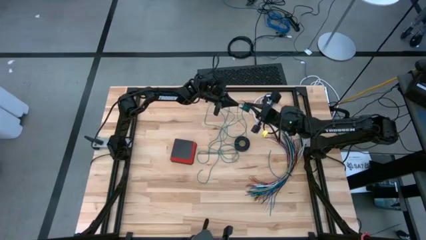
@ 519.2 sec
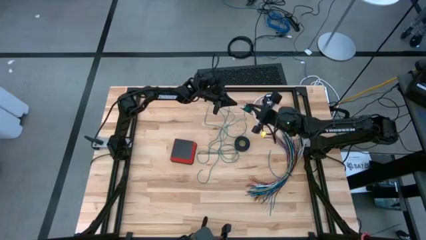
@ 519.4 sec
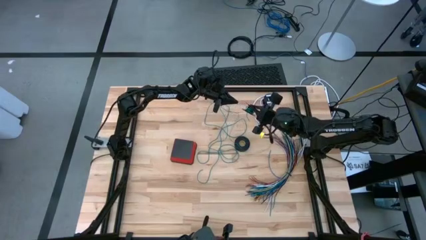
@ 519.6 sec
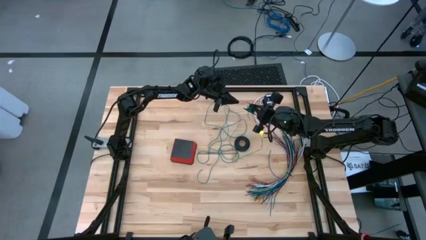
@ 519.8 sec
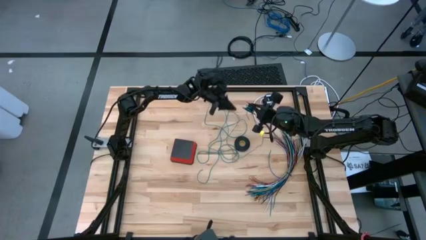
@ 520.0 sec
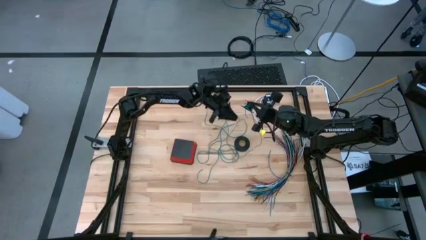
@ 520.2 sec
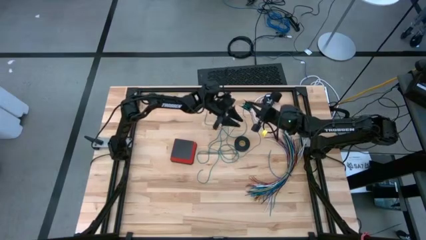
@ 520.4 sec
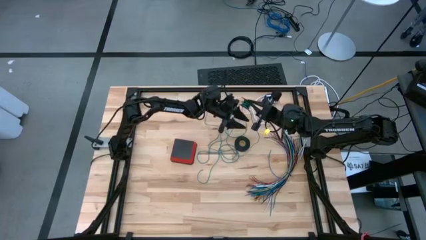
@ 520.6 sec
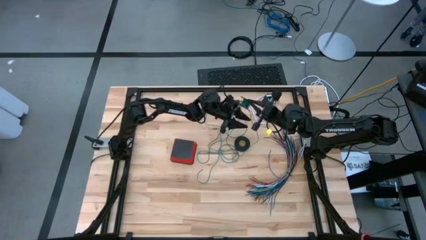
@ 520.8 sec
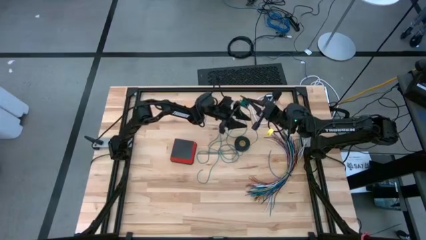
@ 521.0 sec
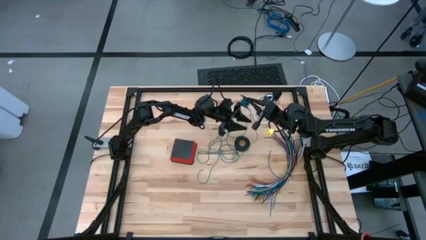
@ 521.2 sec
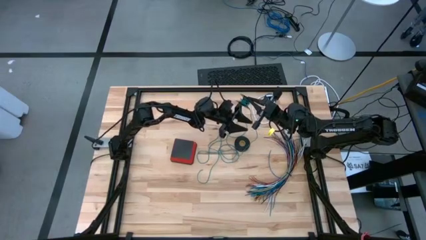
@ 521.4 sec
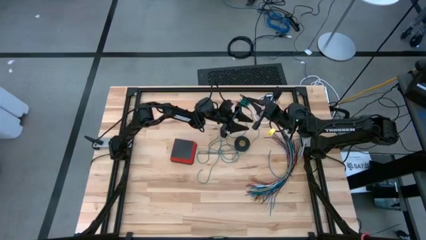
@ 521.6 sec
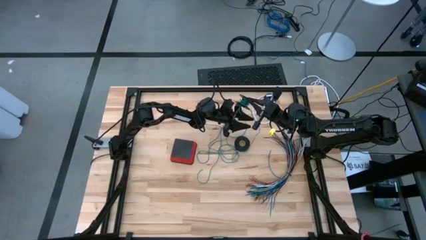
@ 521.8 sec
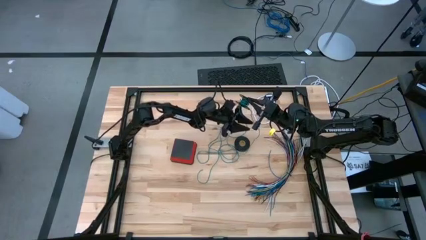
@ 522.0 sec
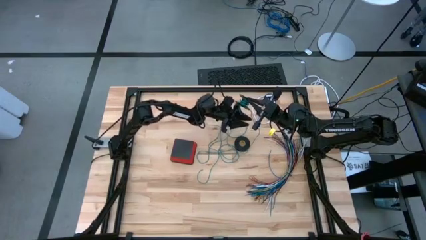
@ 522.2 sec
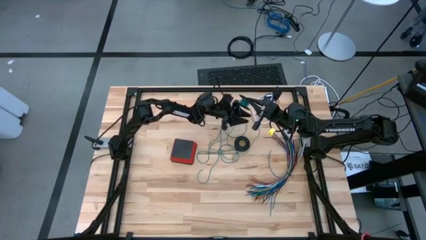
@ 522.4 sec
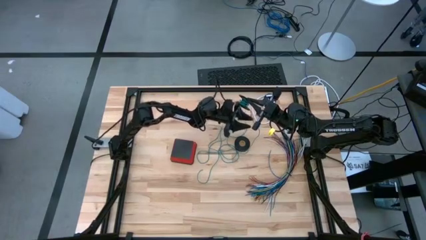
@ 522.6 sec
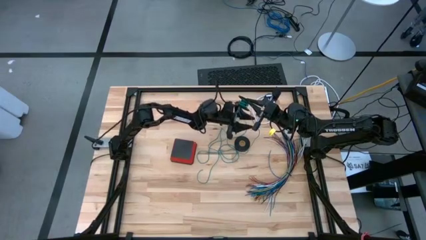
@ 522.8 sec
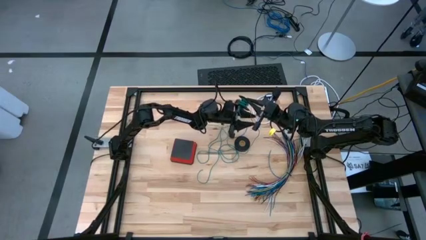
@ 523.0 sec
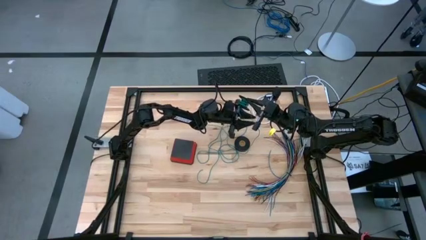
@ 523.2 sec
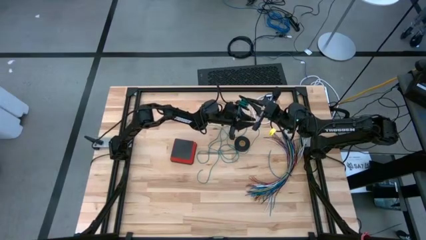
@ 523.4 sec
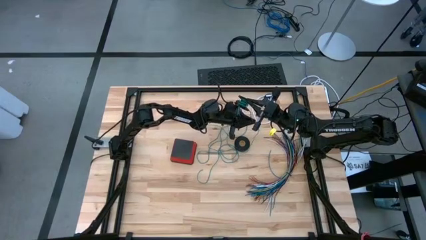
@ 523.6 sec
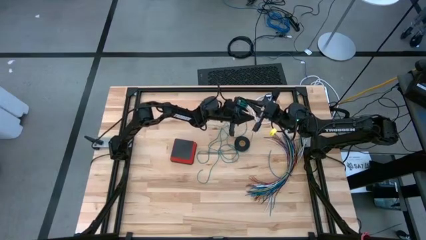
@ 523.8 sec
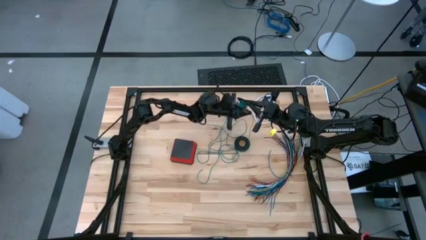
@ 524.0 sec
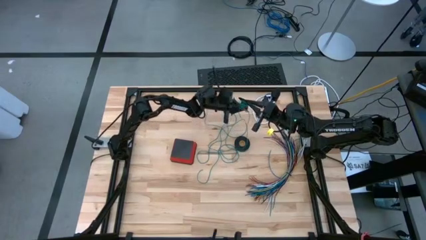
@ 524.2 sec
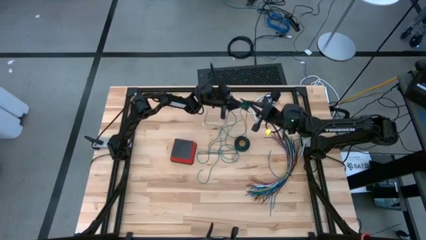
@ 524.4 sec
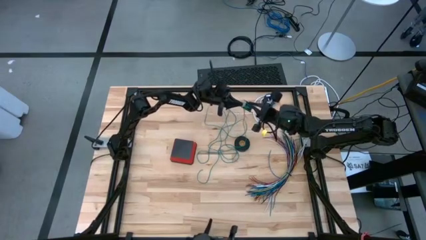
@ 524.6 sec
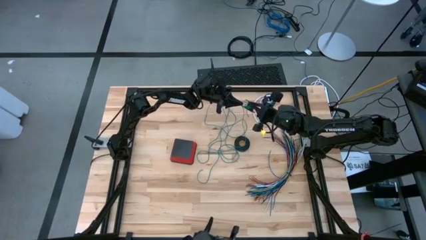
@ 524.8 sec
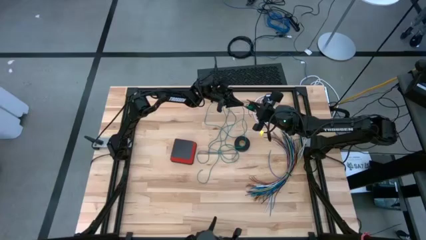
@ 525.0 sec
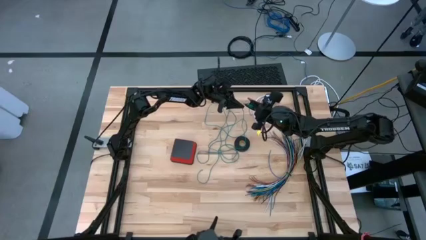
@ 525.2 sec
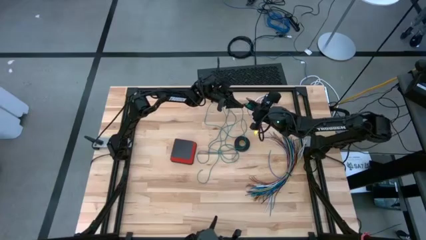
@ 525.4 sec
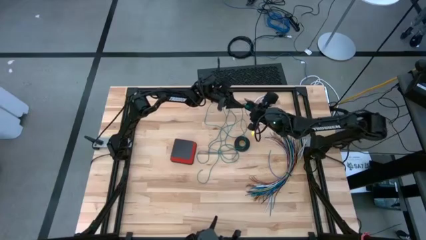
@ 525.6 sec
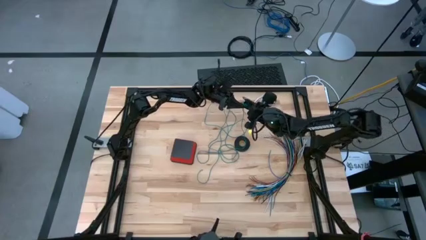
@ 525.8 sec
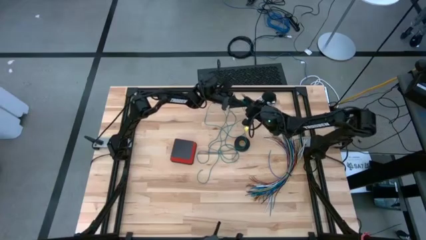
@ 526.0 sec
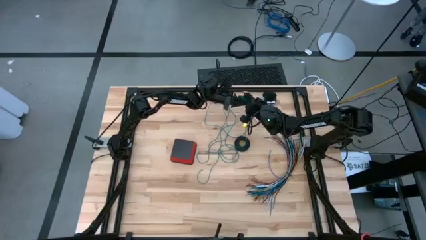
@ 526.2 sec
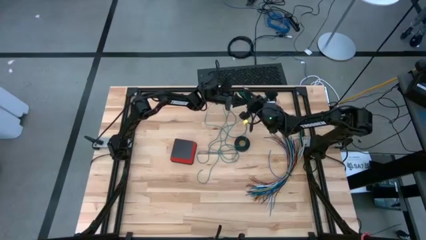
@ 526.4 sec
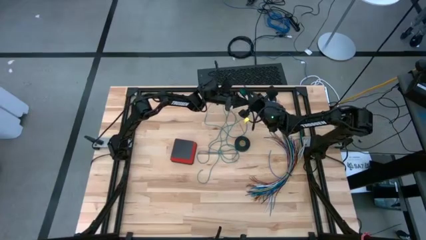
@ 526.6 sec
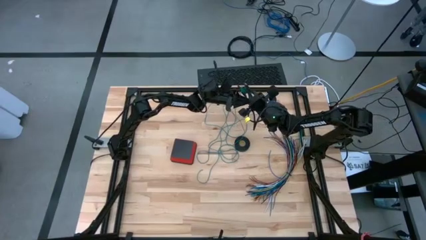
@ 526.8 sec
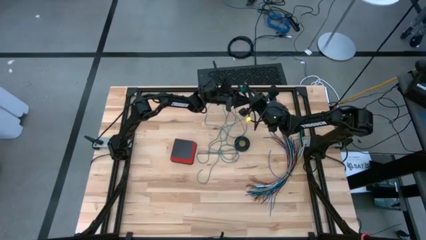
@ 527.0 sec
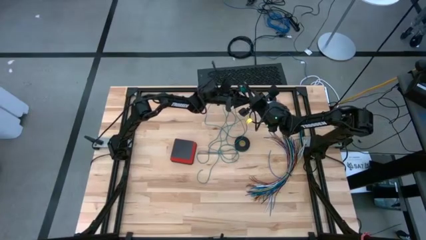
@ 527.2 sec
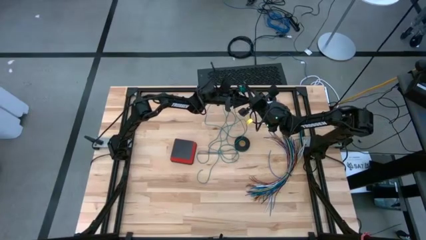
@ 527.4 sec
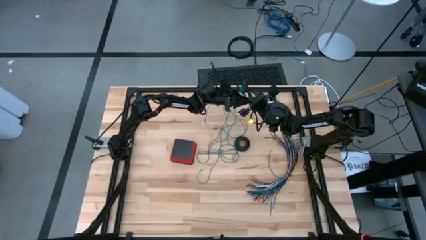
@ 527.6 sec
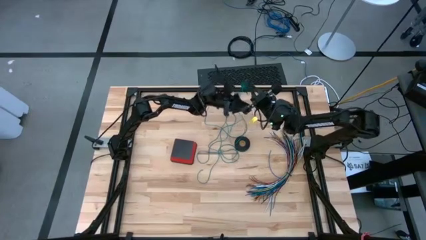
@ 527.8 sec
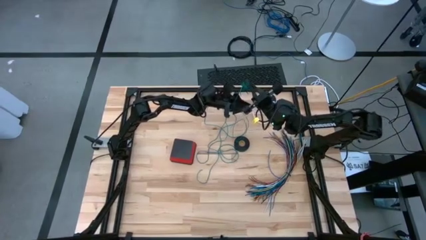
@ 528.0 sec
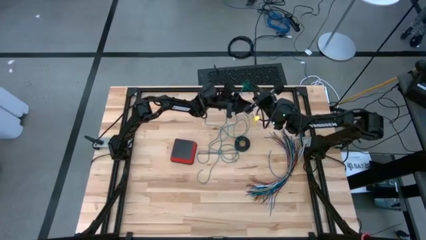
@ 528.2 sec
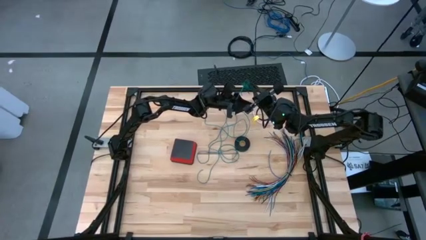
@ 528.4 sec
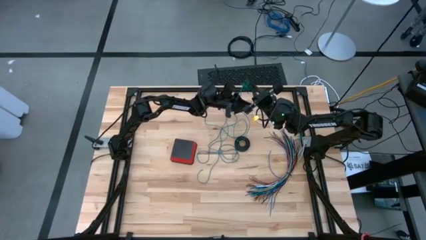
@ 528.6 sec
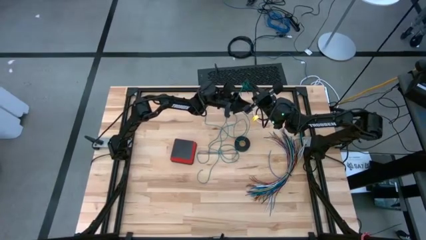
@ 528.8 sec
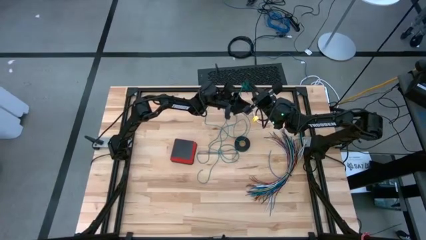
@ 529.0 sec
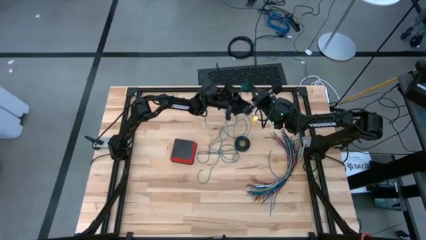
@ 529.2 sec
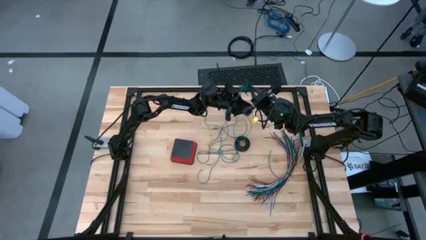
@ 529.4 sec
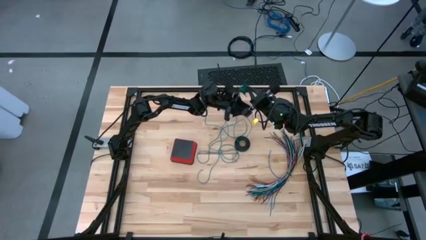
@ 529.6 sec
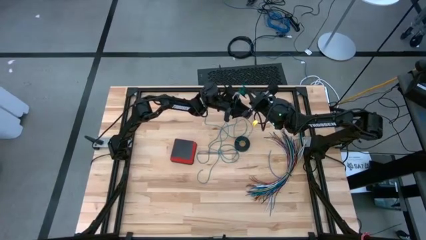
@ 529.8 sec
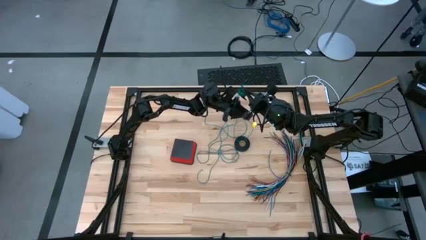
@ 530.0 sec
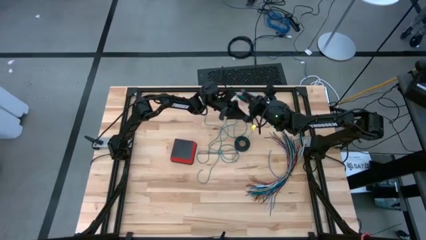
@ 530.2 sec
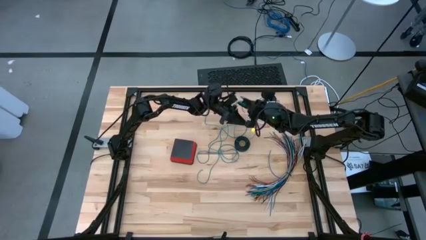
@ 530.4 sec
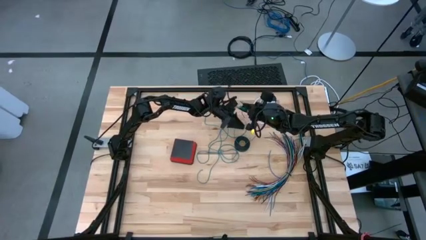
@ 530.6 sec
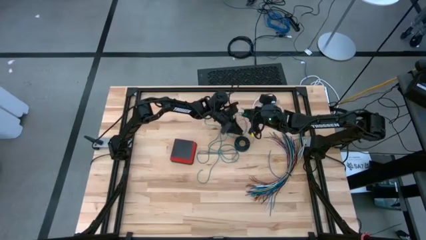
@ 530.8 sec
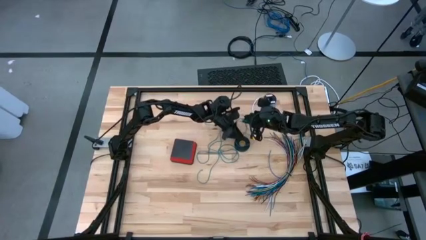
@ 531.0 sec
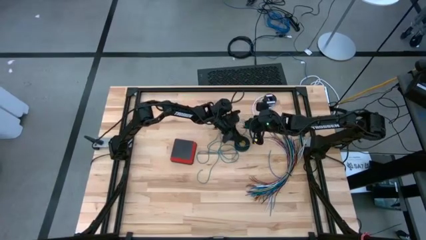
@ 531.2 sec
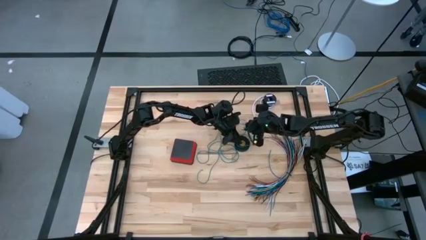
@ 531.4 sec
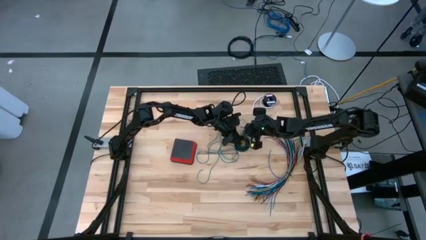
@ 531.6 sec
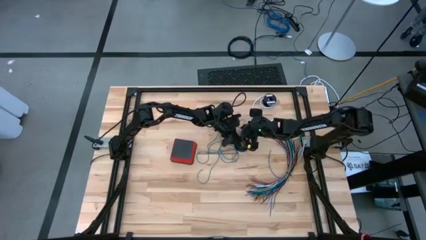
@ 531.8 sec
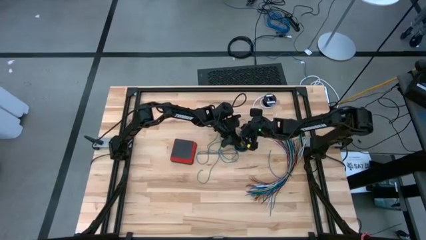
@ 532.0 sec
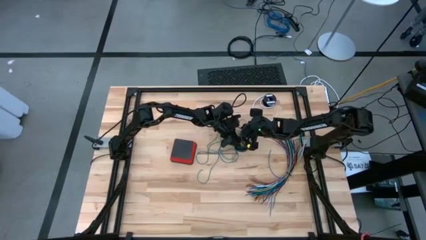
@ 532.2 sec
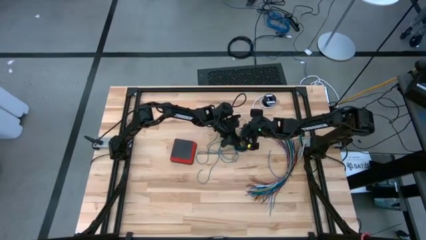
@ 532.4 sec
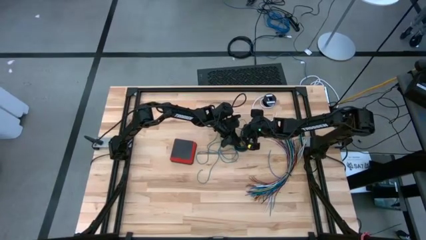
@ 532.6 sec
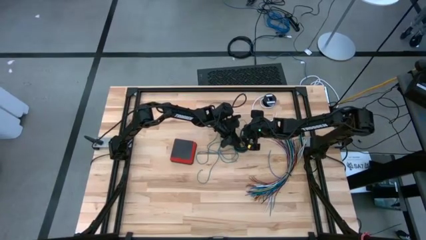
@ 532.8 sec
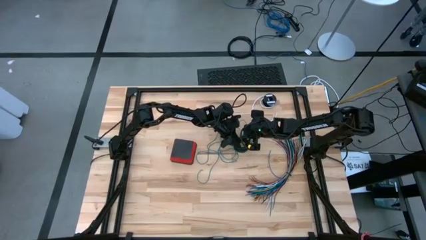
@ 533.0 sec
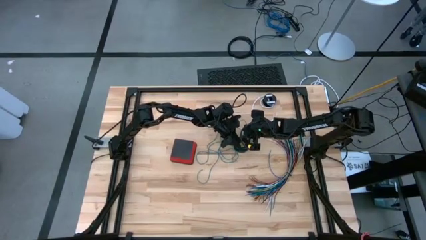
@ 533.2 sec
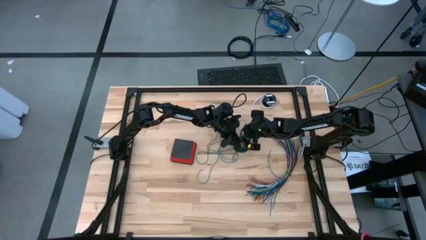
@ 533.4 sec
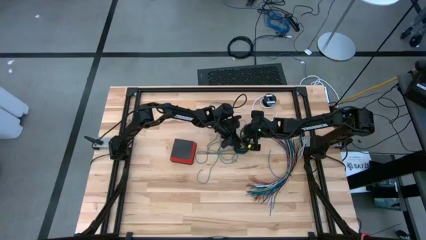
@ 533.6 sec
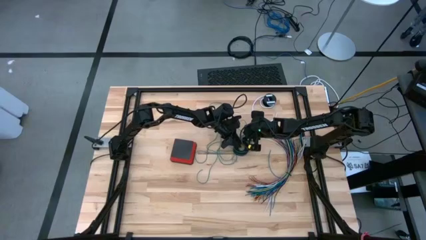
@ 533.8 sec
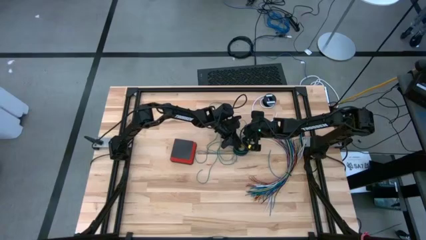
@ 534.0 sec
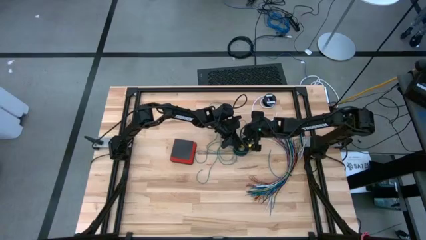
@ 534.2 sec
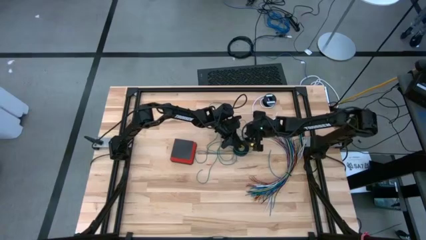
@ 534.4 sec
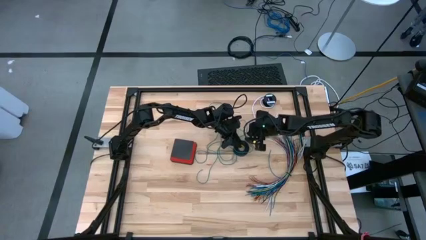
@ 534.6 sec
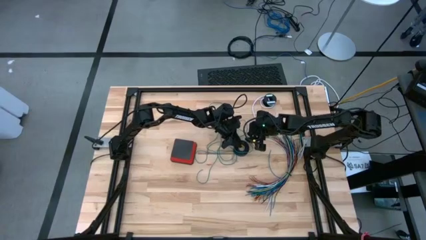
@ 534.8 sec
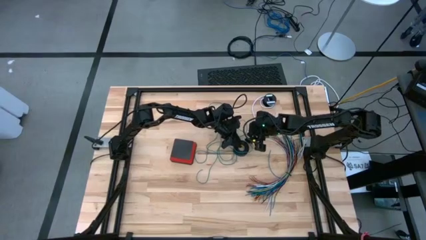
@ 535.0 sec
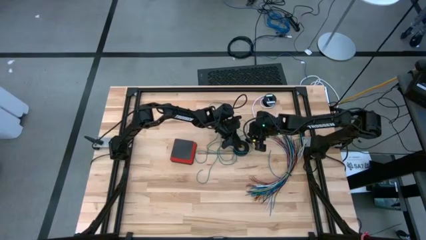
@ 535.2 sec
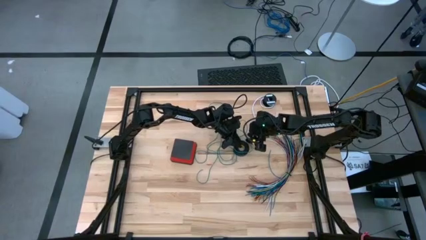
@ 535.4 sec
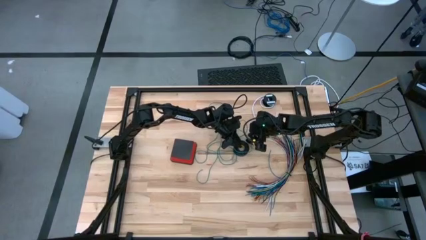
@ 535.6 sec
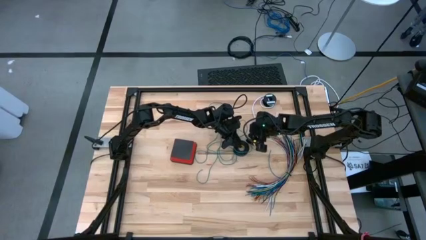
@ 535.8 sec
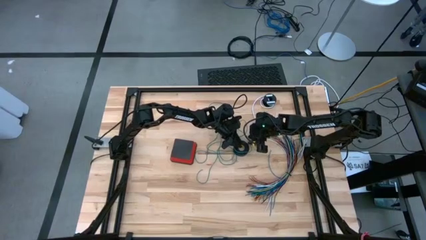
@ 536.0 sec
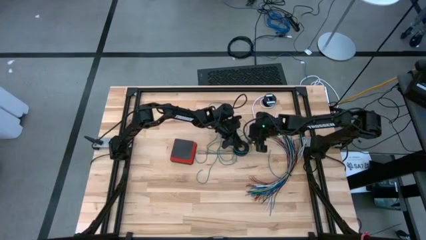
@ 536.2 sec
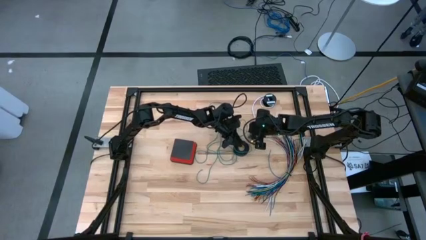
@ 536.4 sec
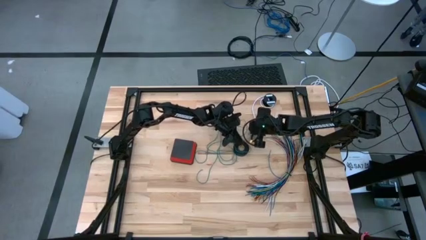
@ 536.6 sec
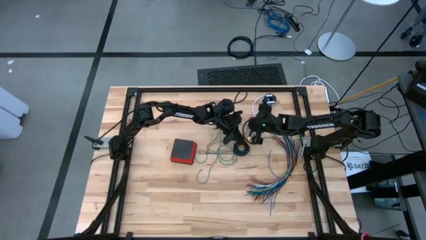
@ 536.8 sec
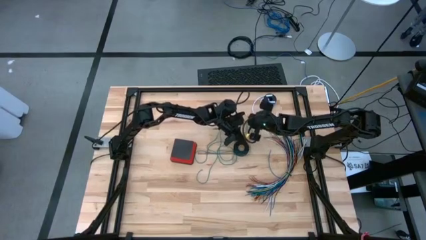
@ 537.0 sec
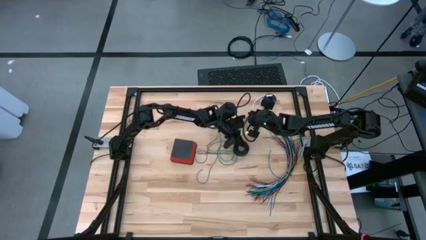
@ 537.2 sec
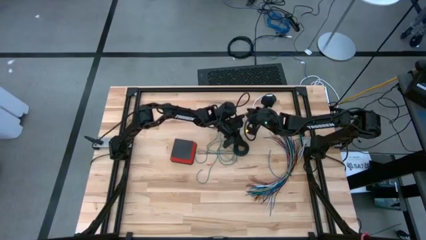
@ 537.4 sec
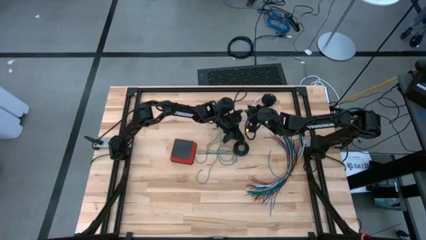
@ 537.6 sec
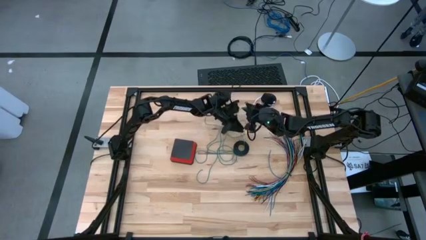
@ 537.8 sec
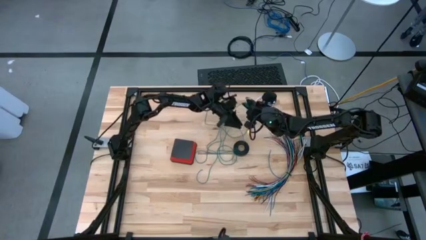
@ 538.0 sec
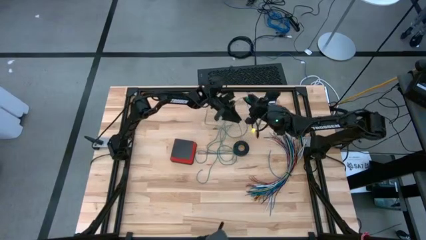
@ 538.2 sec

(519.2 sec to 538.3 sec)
Task: Coiling cords
Coil the green wire cable on the spool
